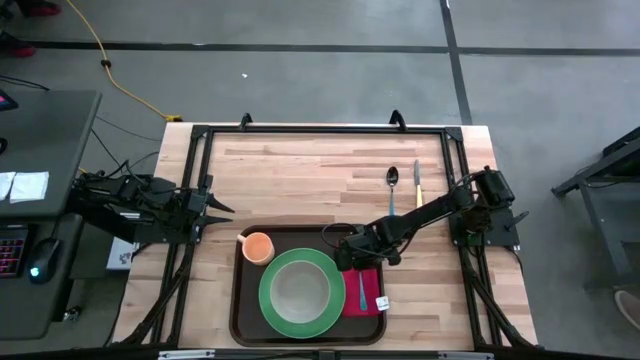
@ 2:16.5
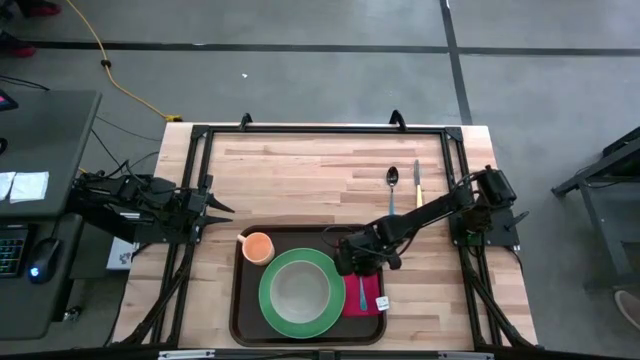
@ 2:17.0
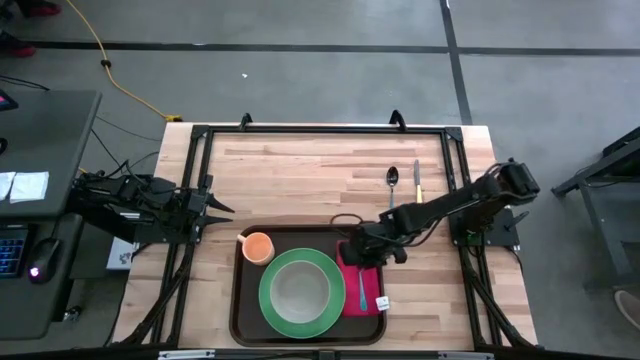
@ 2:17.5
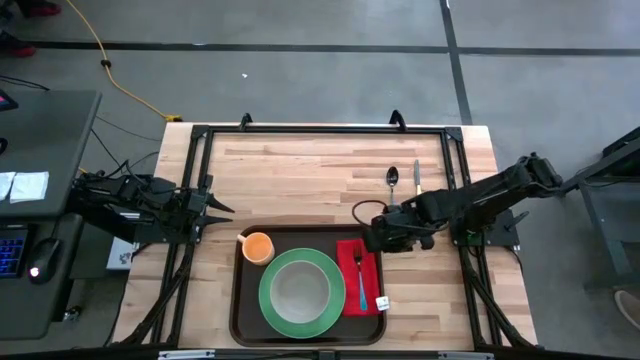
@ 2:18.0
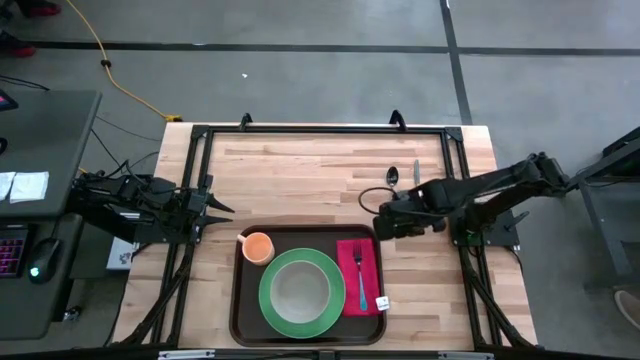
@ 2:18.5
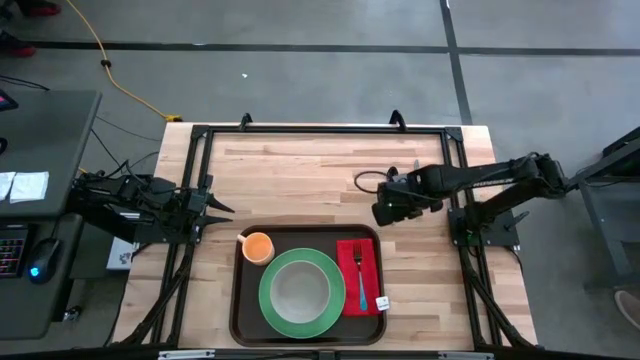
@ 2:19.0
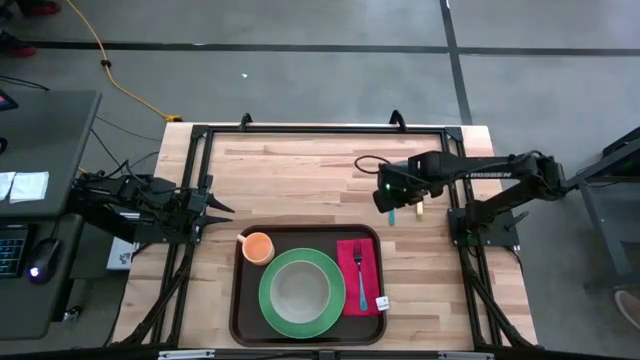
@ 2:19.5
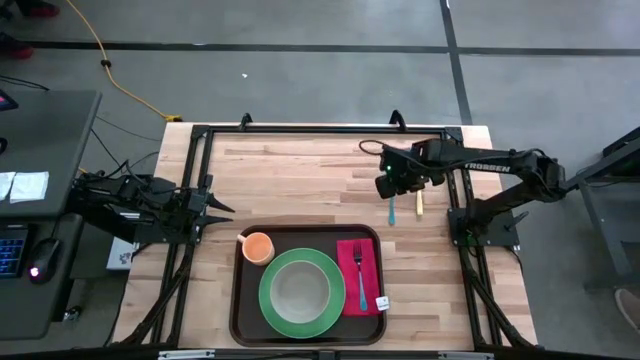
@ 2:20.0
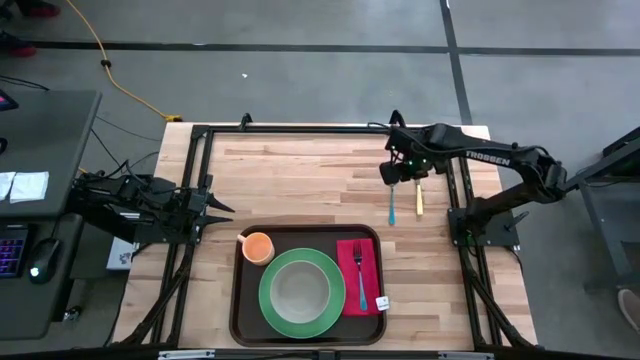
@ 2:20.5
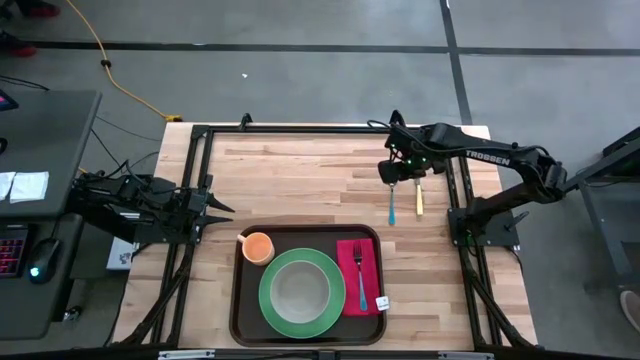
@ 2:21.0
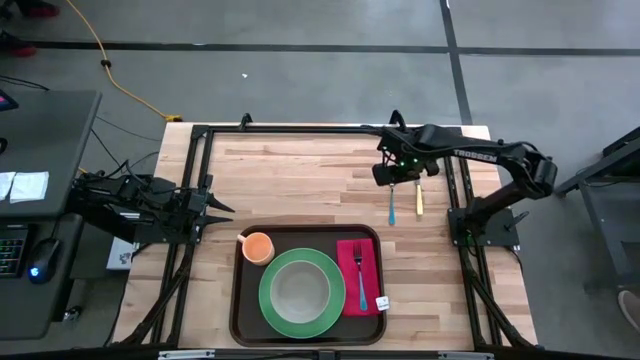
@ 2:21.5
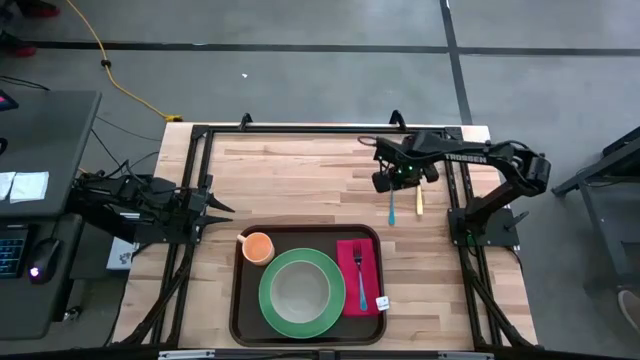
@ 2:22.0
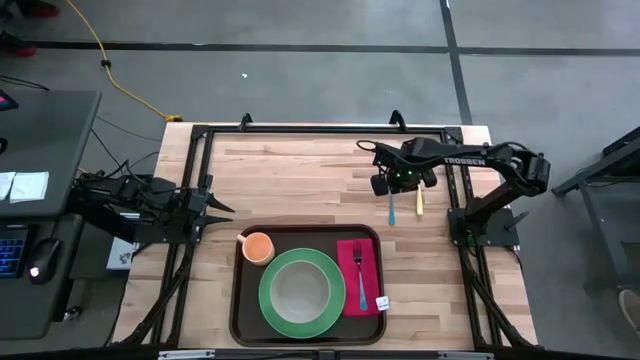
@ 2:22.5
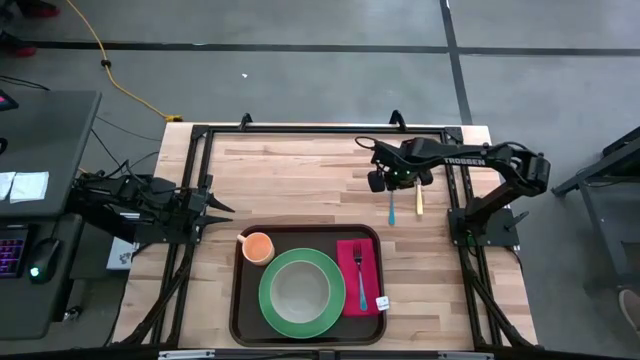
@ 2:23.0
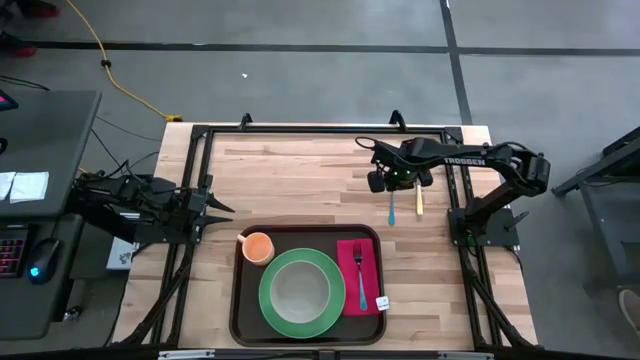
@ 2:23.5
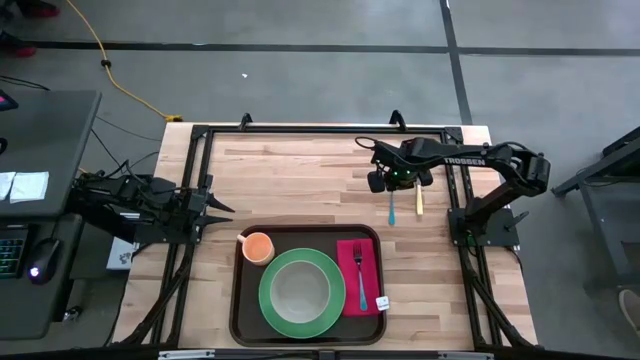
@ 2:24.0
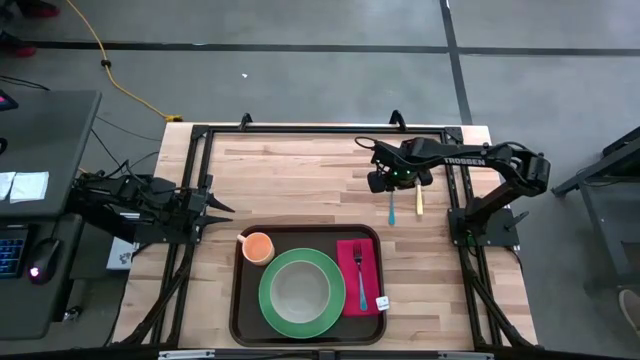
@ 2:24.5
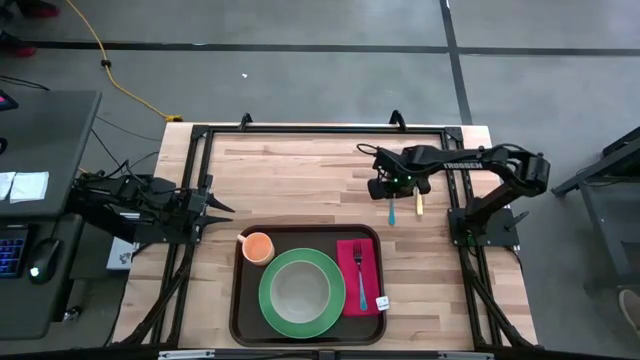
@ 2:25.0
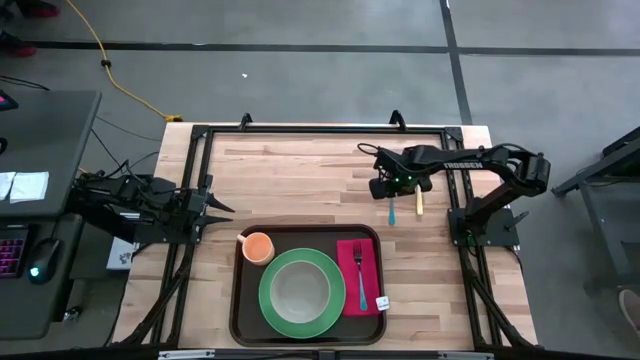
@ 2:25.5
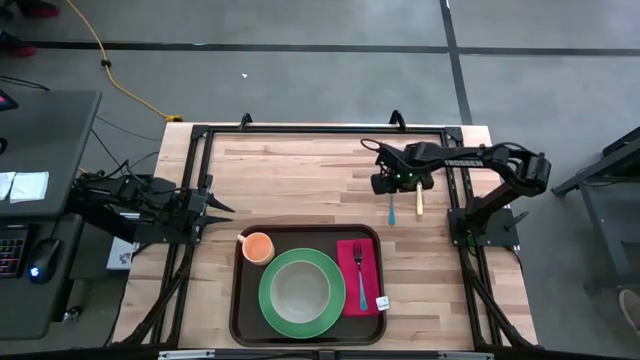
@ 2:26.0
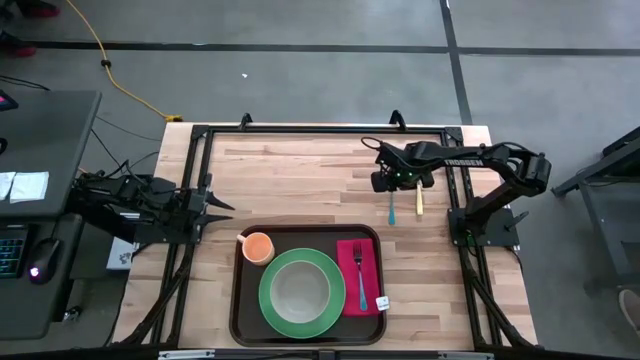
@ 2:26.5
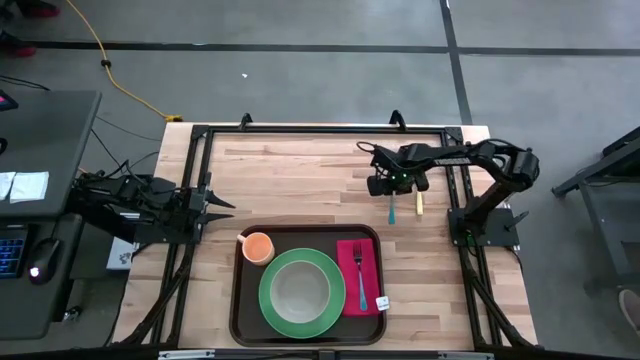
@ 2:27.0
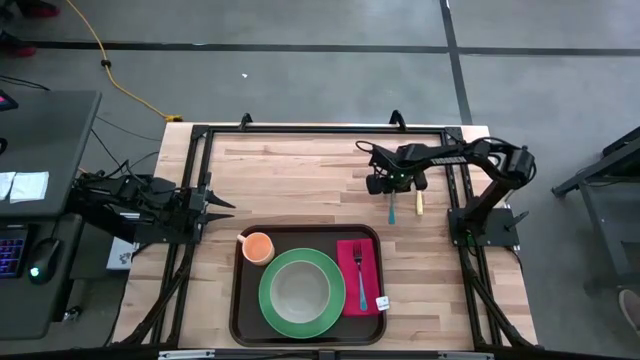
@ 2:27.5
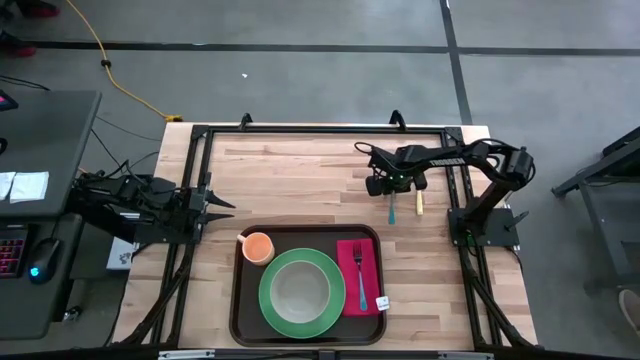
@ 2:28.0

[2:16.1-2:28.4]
Task: Set up tray
Put the blue spoon on the red napkin

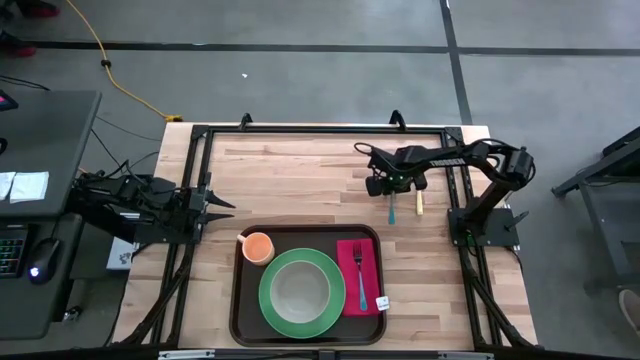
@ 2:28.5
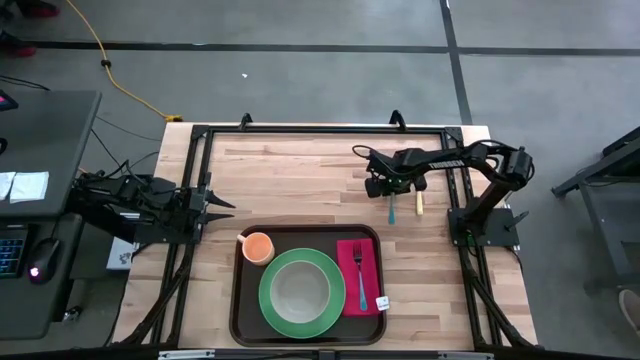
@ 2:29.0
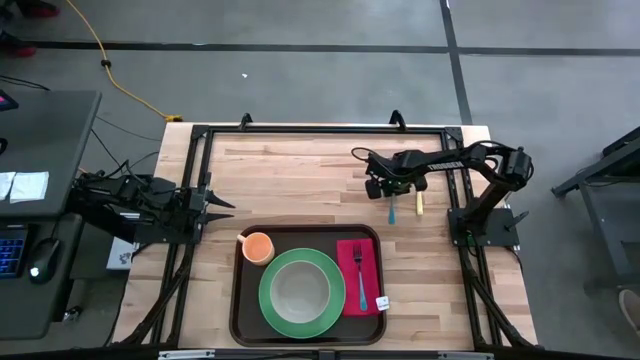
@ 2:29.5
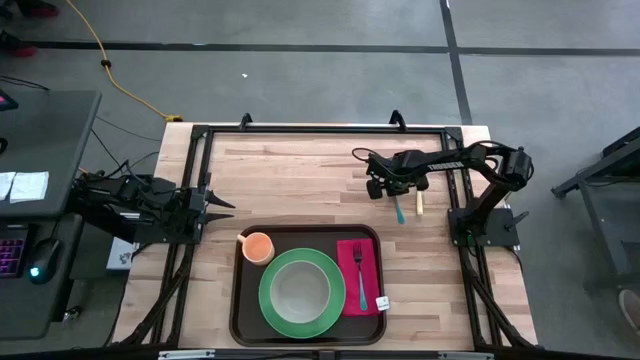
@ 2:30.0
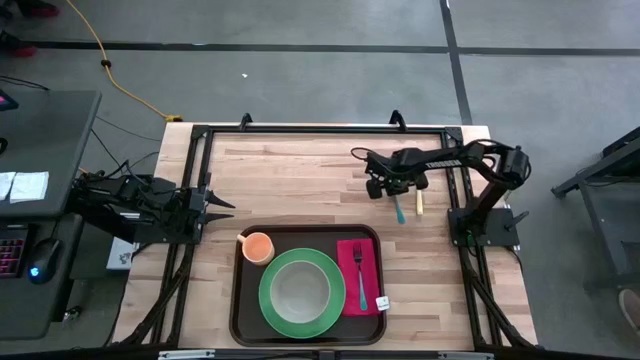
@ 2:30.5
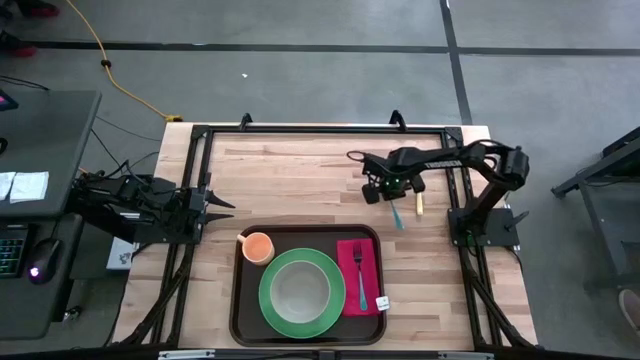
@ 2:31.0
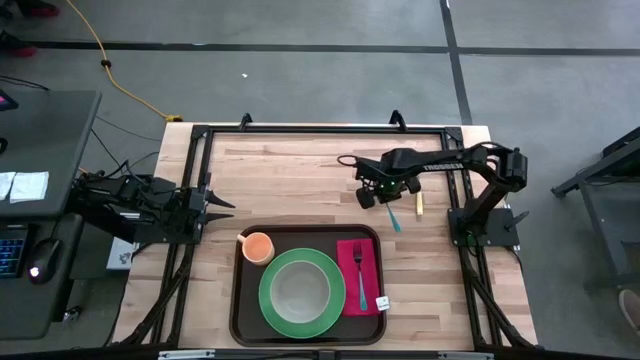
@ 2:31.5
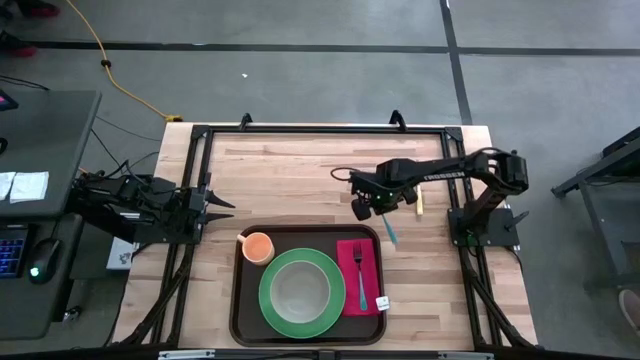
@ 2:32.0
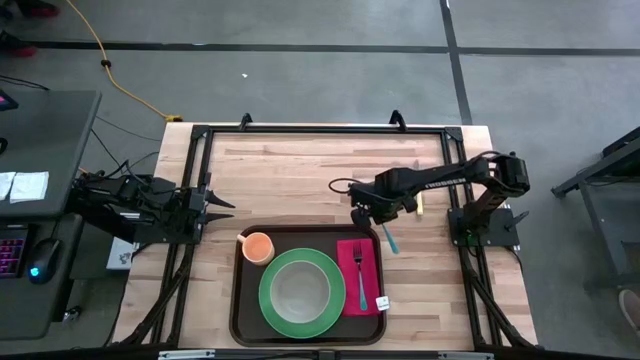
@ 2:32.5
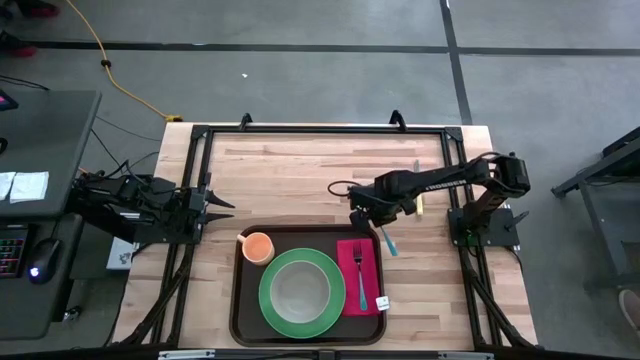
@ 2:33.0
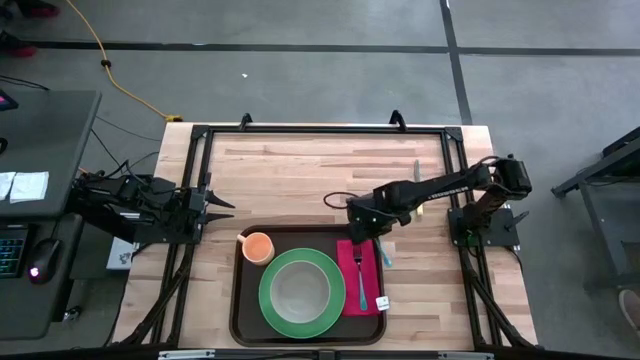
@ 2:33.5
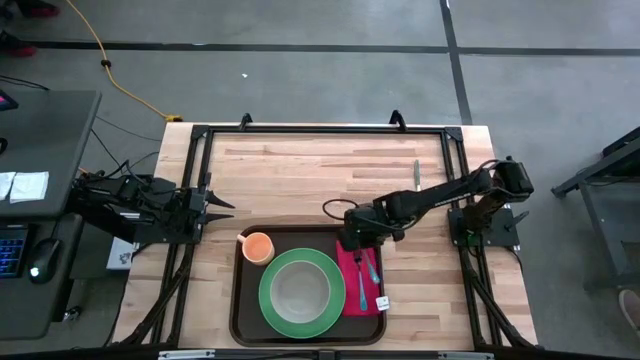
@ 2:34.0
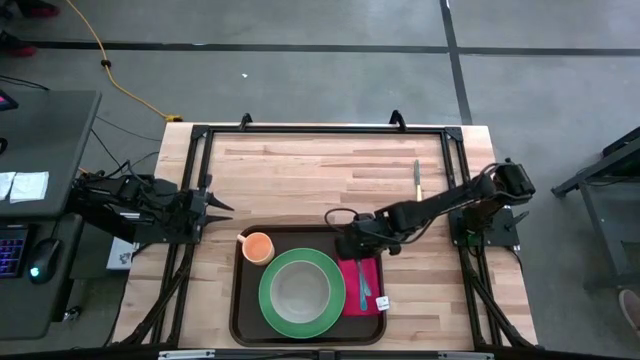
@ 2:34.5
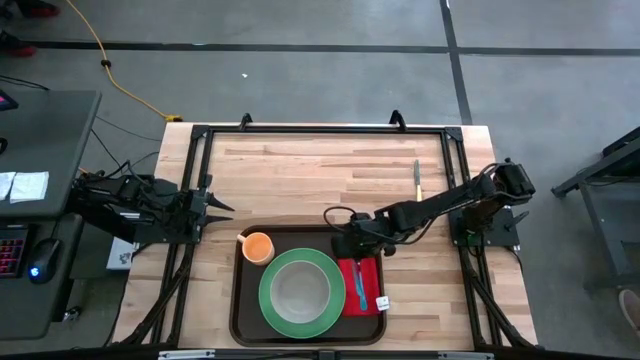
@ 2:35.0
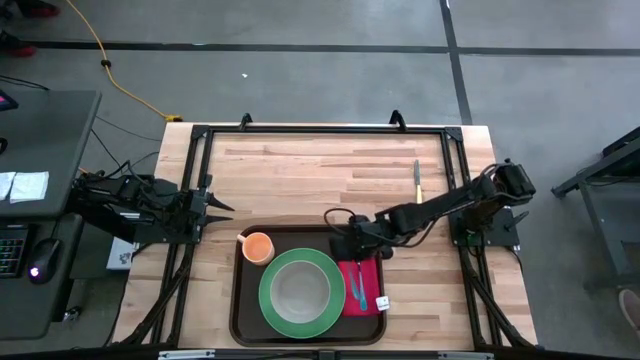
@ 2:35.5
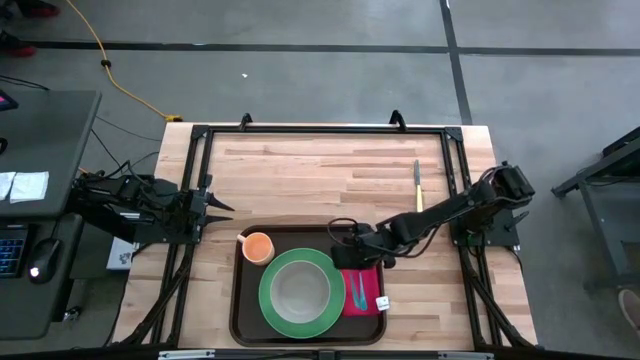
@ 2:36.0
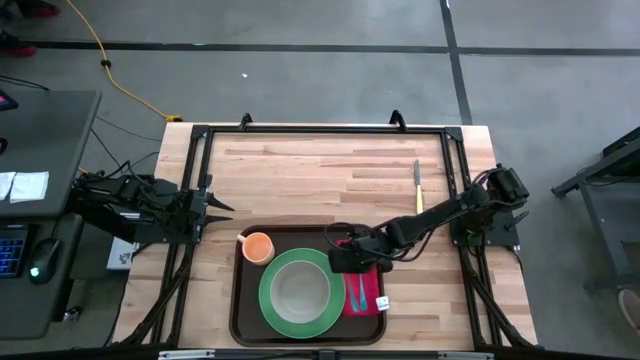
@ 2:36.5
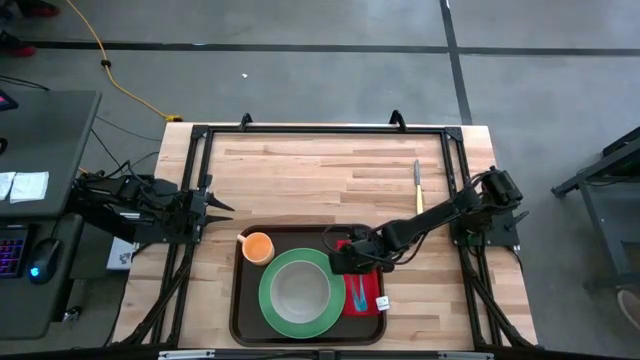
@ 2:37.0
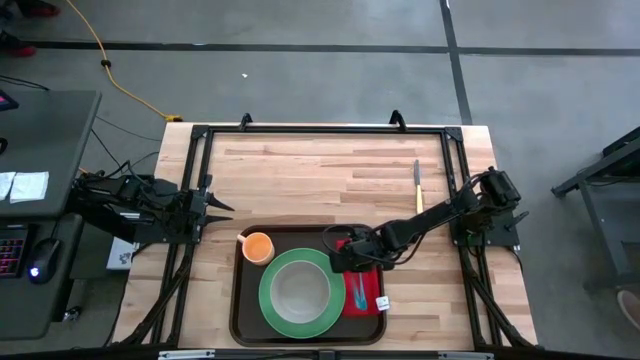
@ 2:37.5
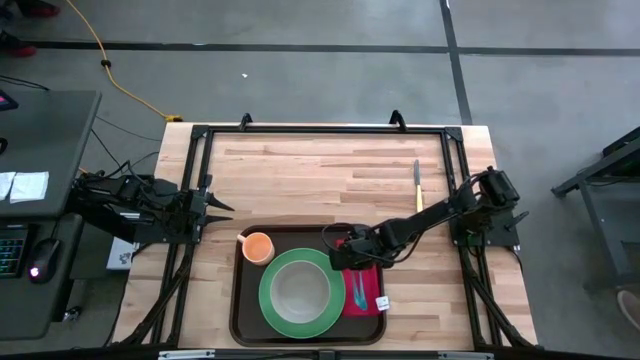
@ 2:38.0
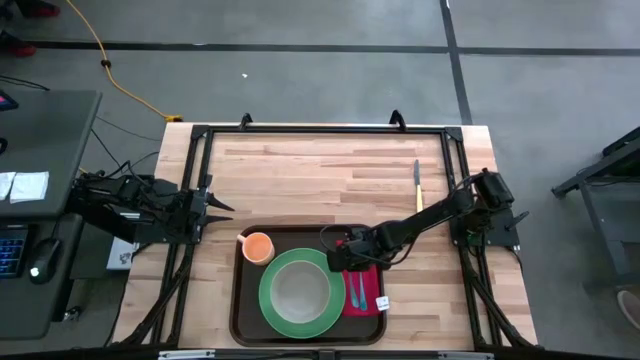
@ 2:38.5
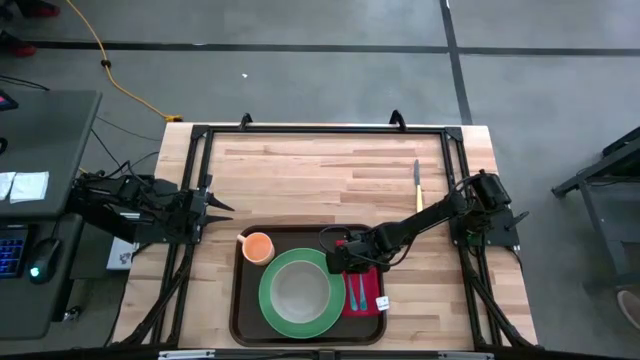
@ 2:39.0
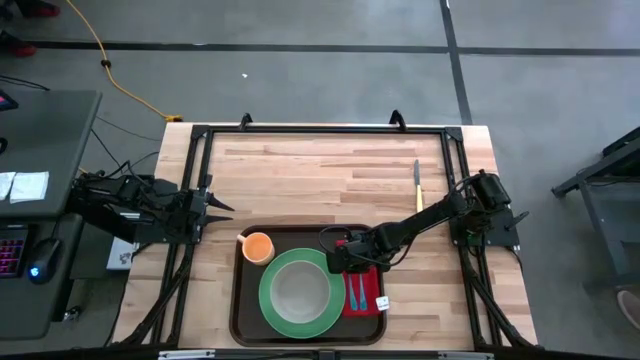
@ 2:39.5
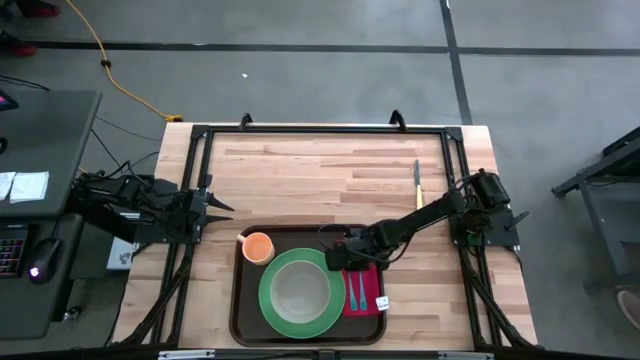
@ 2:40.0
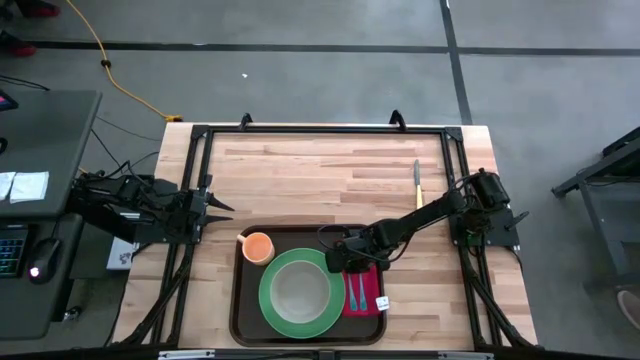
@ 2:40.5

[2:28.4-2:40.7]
Put the blue spoon on the red napkin
